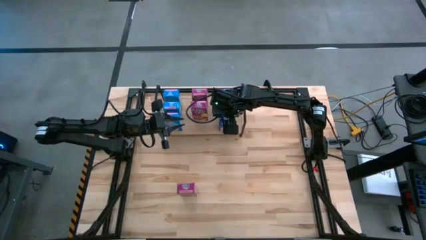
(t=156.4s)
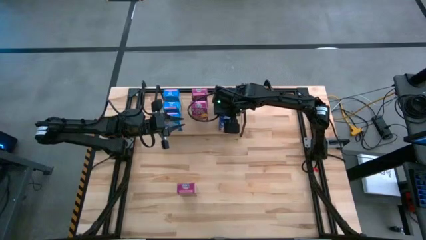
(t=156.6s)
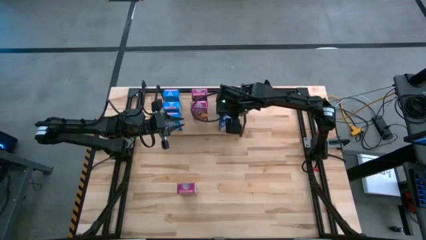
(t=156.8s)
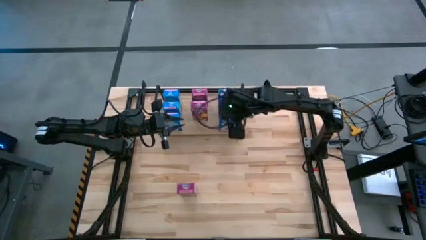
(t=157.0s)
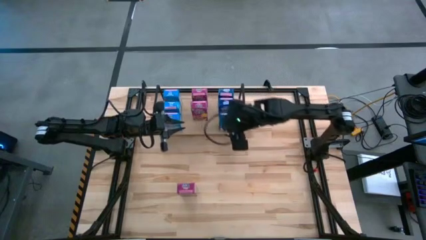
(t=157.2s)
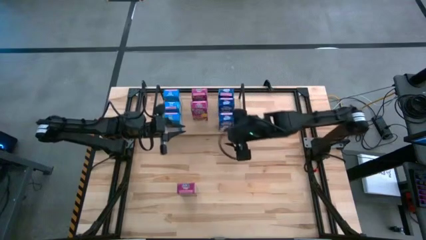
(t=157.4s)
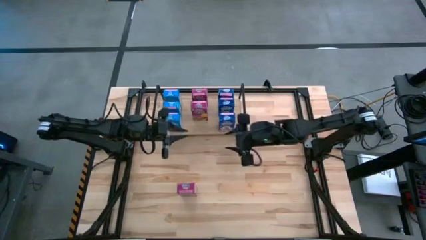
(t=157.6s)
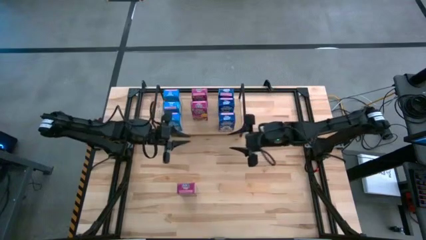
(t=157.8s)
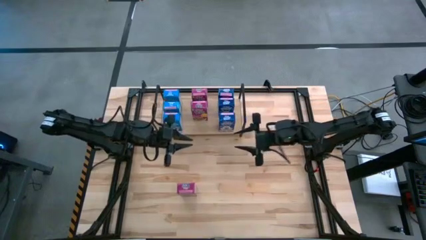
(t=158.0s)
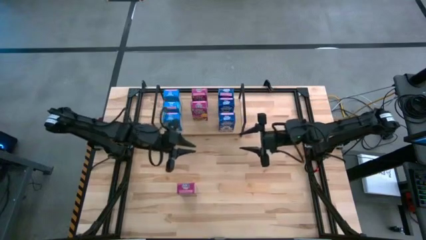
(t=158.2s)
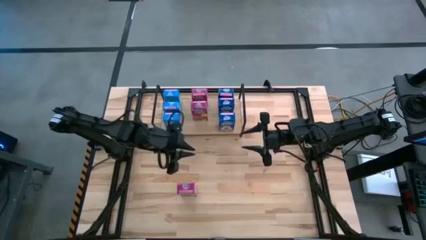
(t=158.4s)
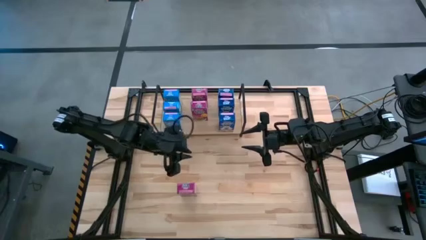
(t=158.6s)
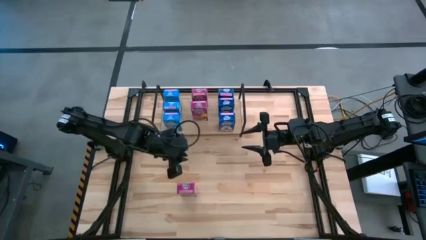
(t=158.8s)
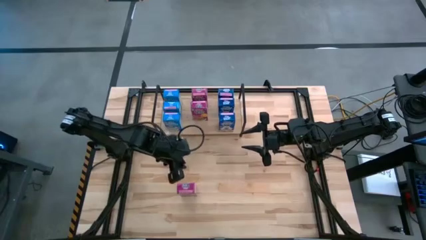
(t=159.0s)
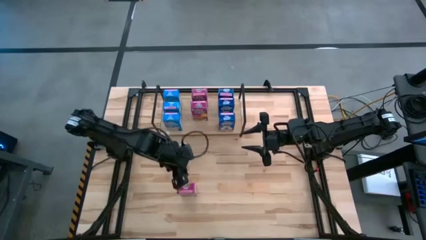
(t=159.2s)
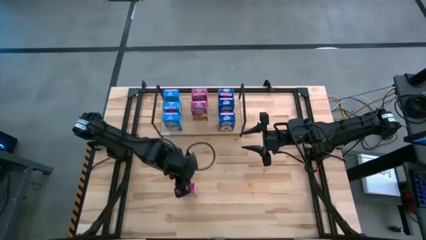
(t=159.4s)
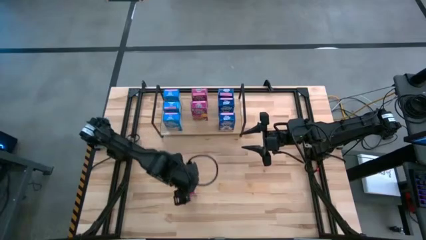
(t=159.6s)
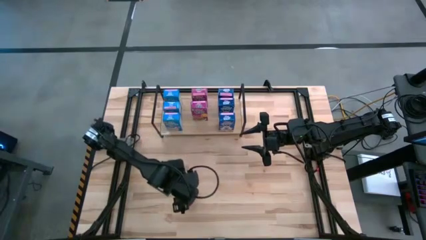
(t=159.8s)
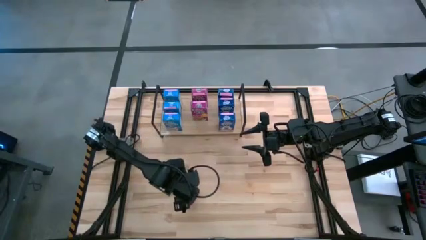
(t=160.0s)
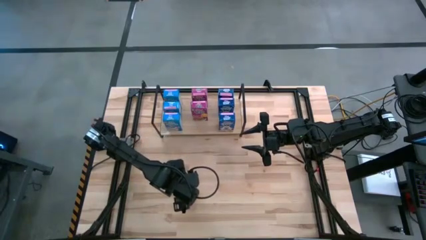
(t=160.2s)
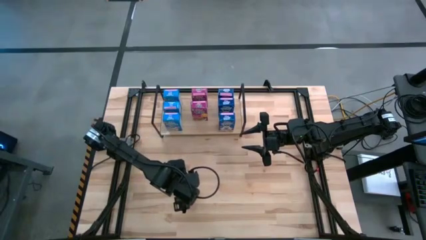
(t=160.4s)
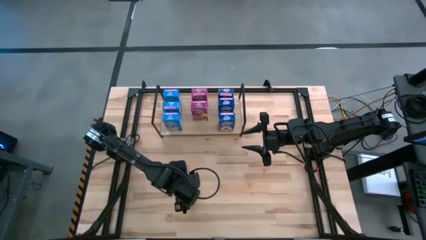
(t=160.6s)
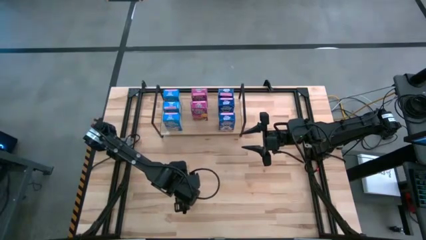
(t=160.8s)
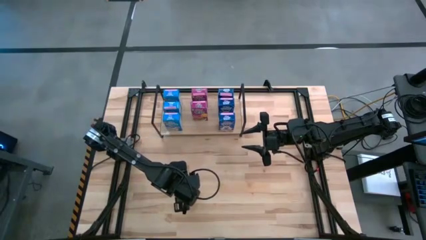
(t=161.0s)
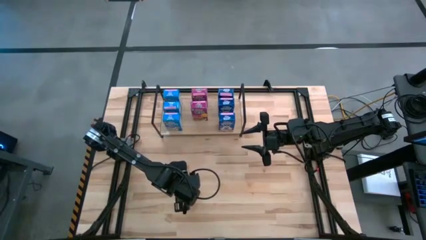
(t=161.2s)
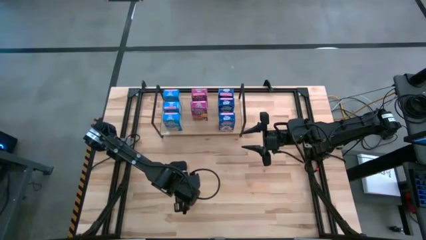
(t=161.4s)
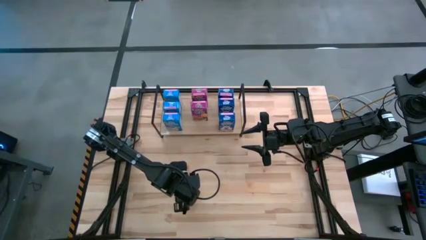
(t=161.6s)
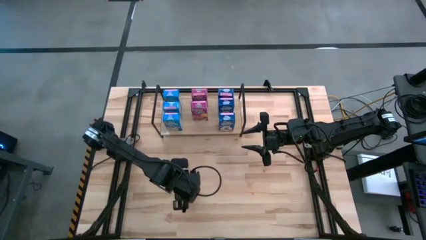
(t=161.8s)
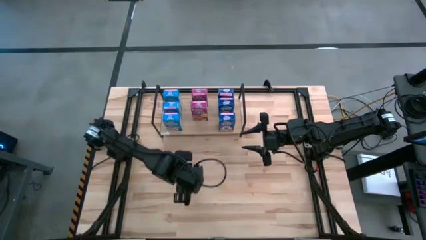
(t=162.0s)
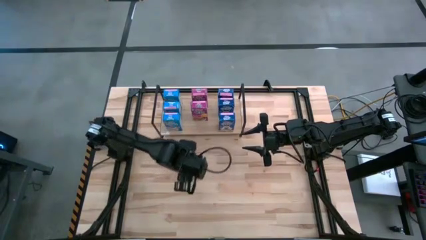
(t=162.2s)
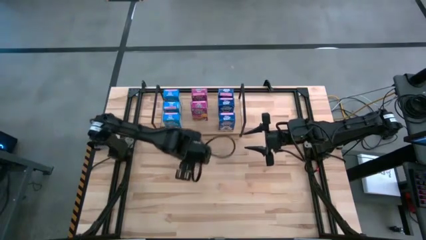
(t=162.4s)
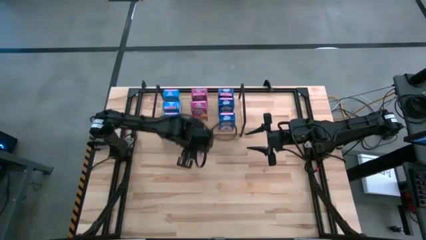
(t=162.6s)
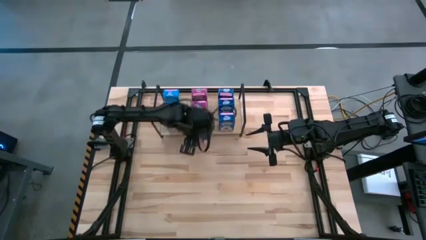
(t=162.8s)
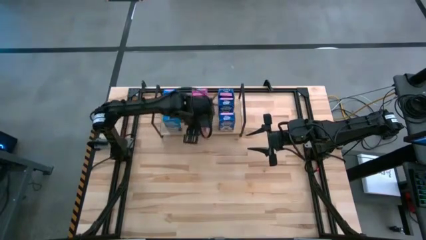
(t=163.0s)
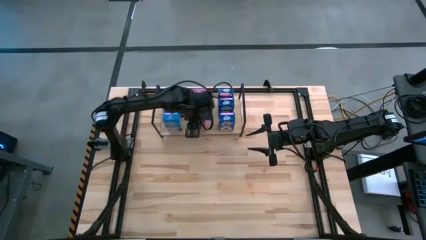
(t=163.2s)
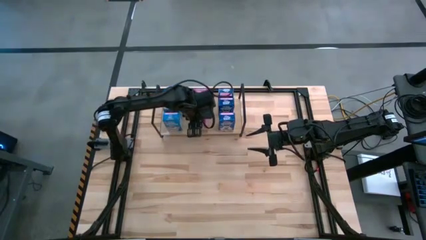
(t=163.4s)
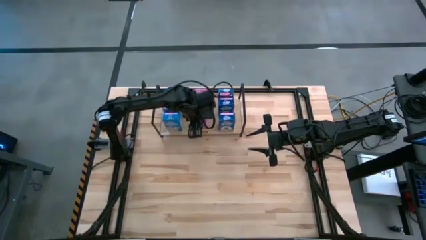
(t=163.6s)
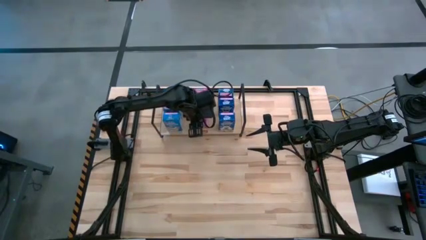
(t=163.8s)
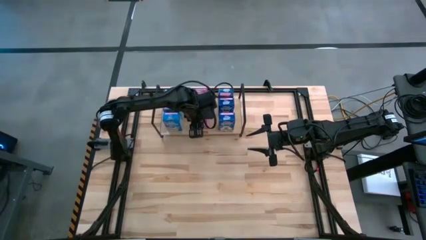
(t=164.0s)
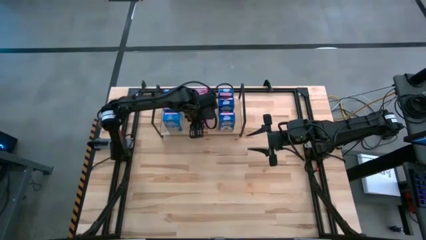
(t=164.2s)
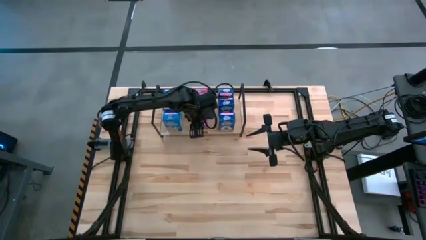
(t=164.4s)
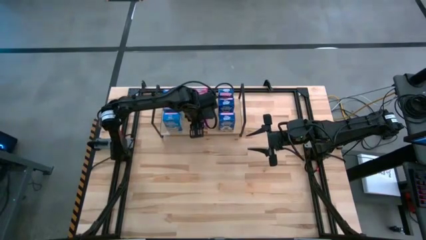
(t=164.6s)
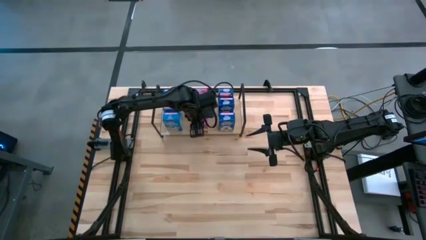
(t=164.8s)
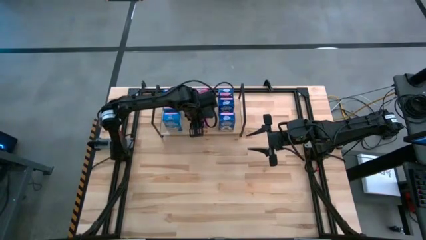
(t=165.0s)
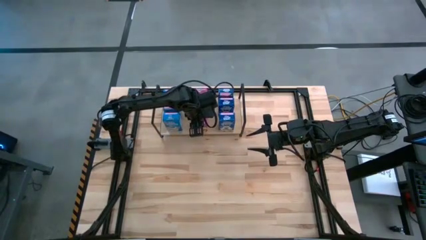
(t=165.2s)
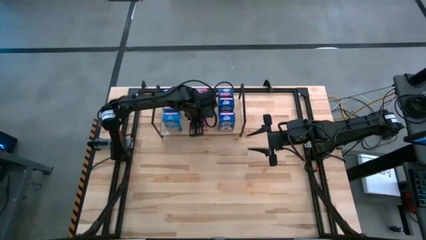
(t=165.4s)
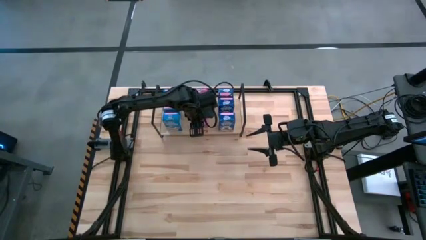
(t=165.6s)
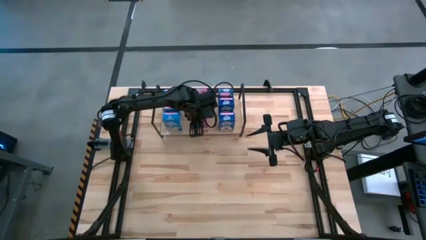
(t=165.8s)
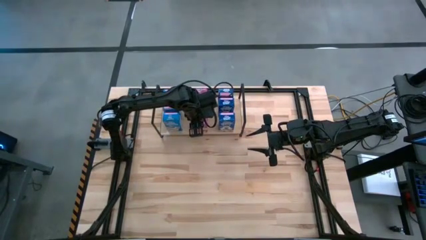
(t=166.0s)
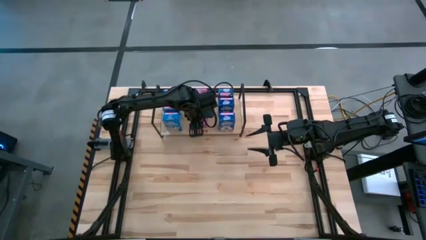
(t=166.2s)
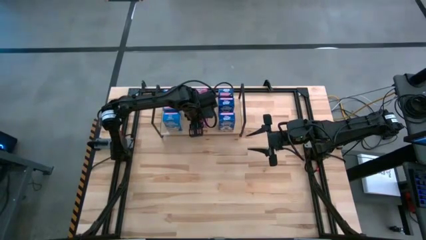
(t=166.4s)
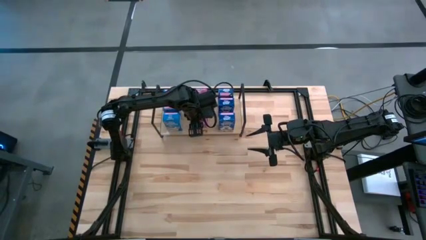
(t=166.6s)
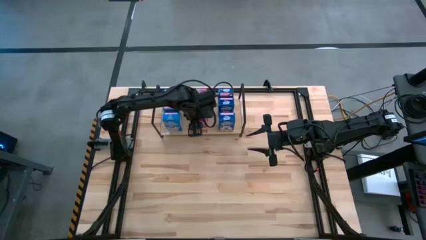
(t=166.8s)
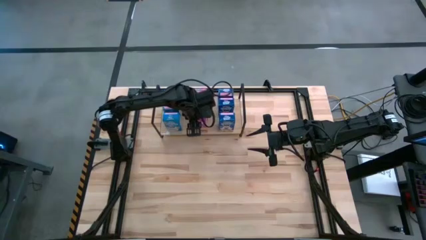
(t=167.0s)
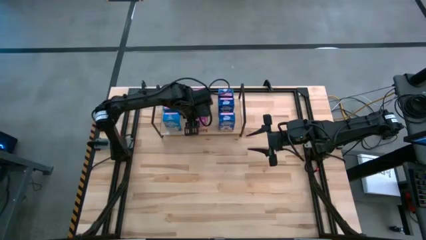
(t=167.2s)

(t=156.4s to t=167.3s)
Task: Stack cereal on shelf
Put the violet cereal box on the shelf aligned with the violet cereal box

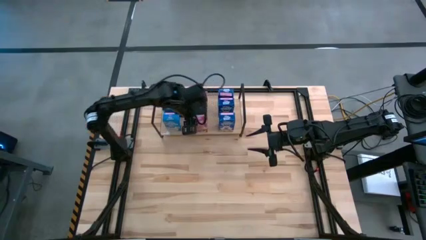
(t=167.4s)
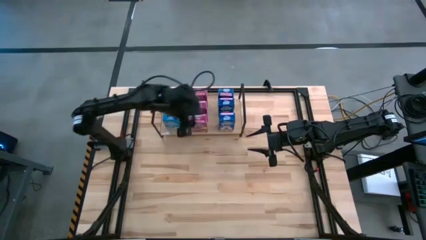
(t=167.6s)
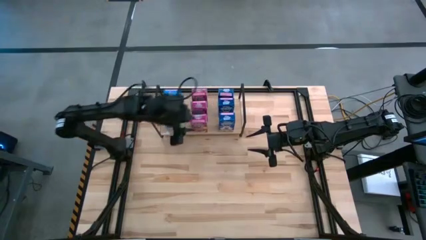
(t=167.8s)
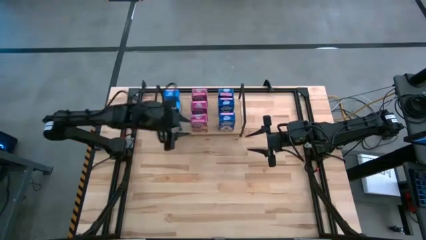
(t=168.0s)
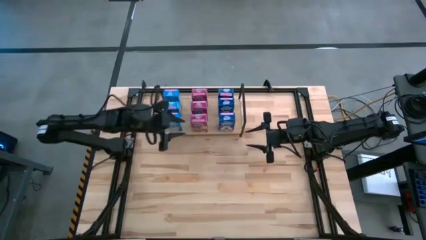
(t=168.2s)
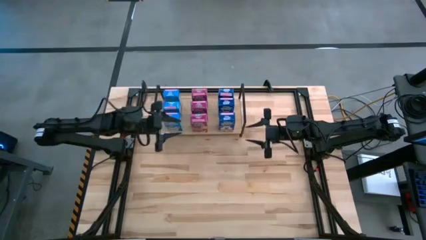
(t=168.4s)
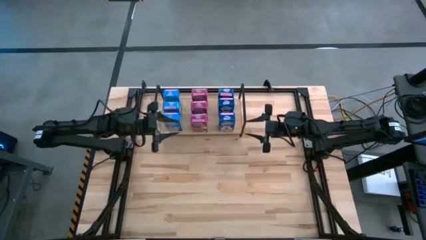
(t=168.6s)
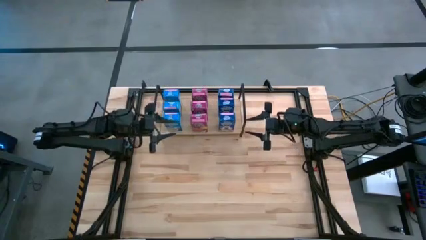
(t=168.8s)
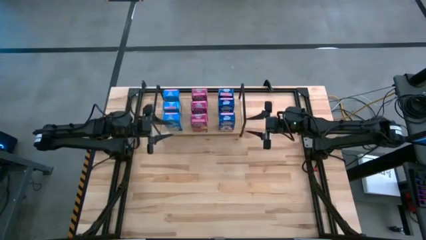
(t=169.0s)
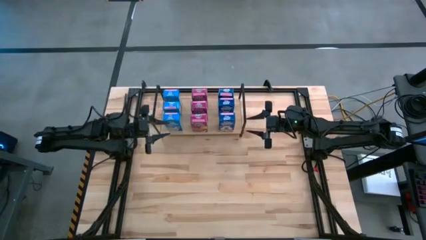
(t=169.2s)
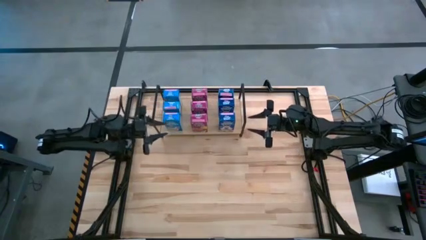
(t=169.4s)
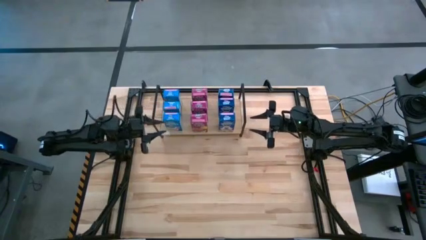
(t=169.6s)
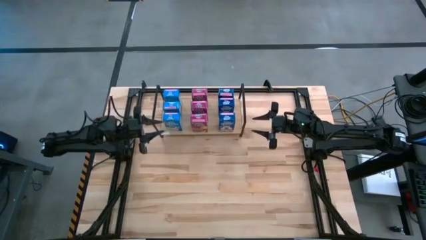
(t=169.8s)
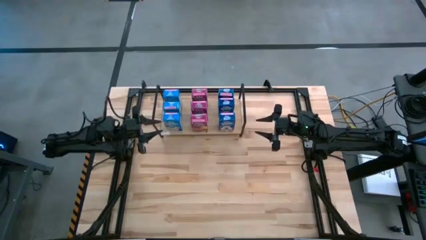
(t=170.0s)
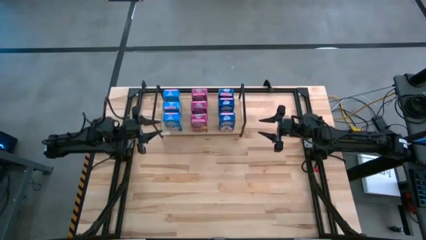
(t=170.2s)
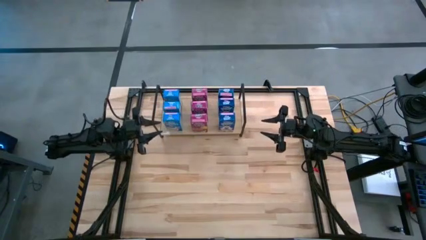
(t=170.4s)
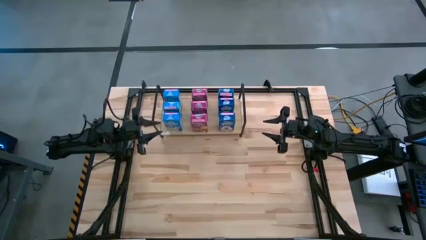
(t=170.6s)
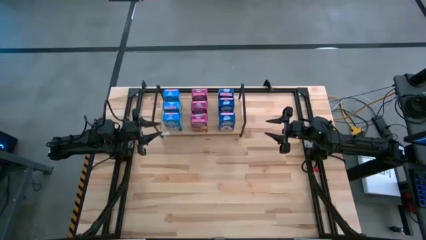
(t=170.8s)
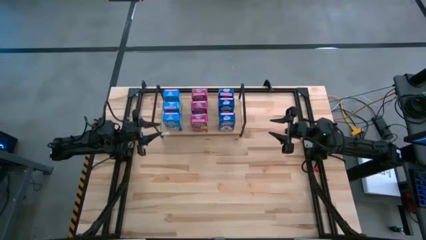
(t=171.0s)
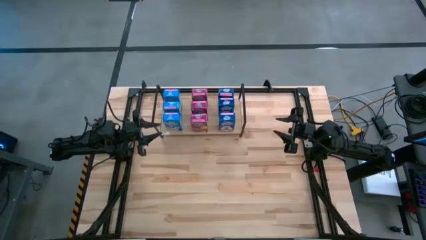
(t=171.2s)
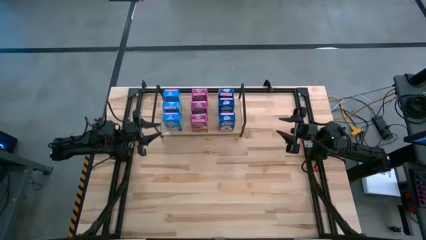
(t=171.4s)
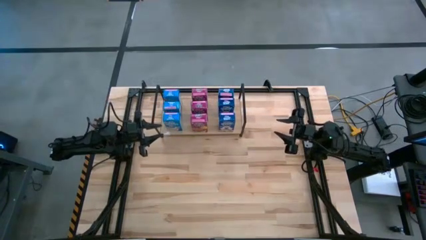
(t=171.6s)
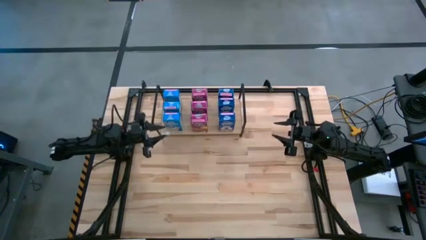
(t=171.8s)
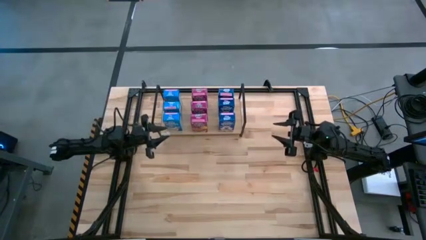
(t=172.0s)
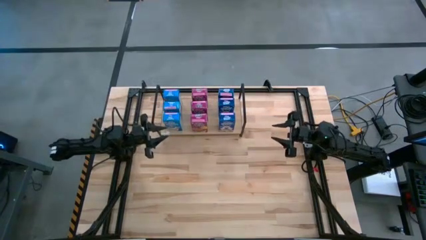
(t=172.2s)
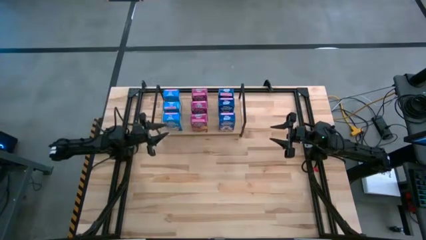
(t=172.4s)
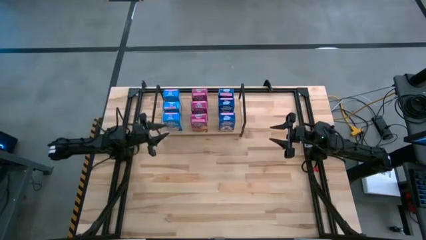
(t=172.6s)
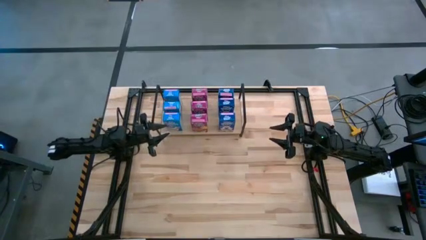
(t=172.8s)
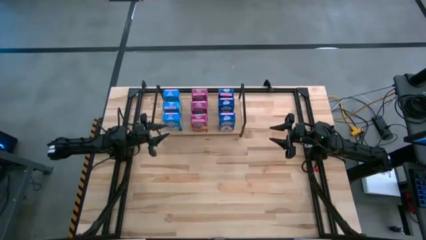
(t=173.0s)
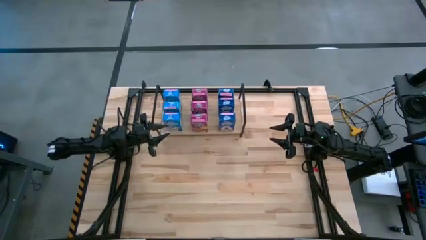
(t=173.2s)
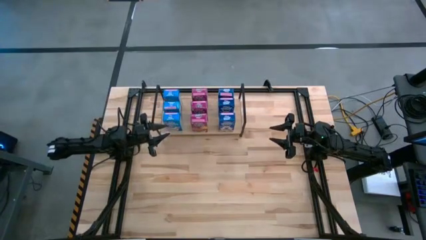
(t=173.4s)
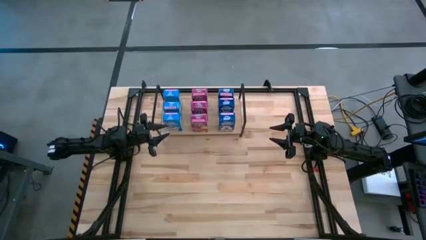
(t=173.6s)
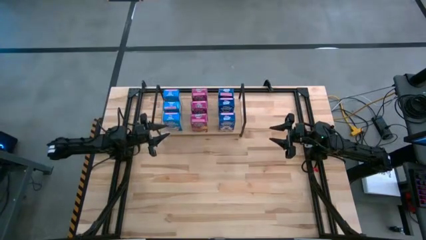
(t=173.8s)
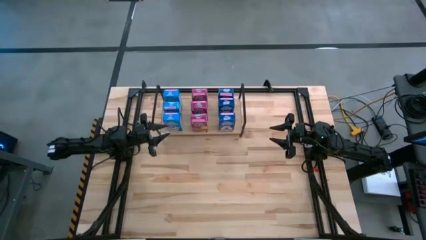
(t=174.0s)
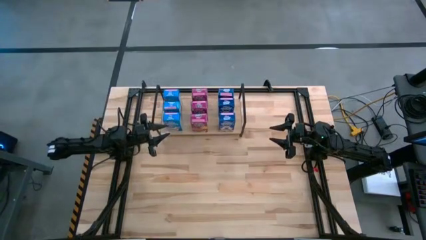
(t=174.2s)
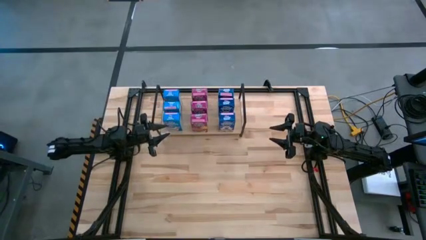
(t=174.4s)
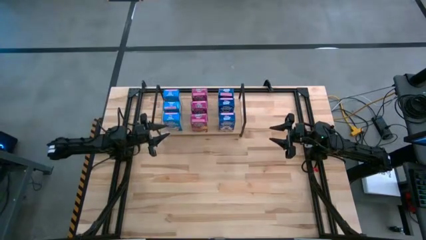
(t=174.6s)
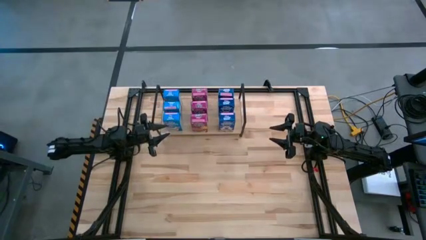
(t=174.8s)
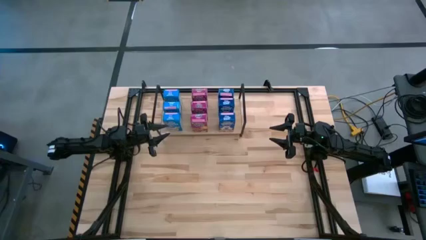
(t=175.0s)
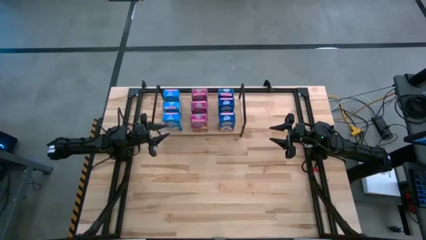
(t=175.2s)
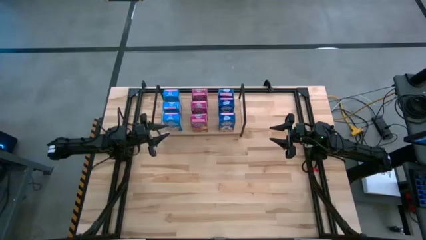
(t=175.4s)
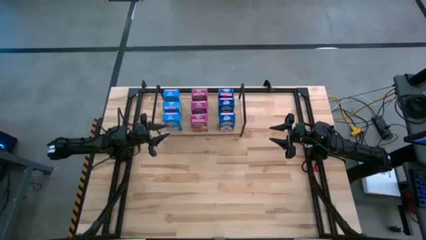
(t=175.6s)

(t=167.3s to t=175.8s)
Return to Home Position
